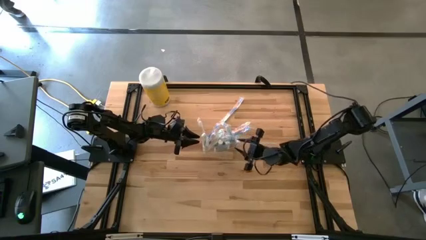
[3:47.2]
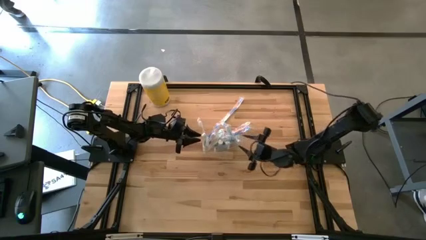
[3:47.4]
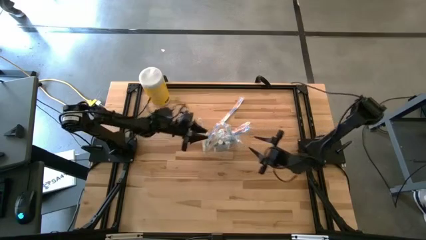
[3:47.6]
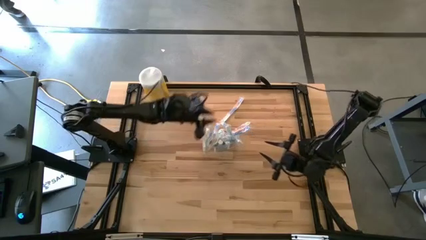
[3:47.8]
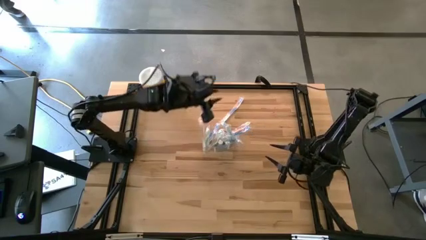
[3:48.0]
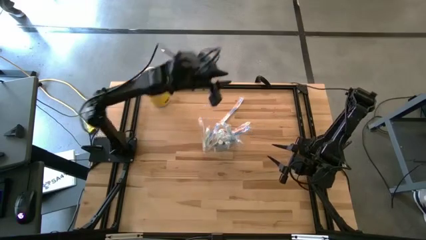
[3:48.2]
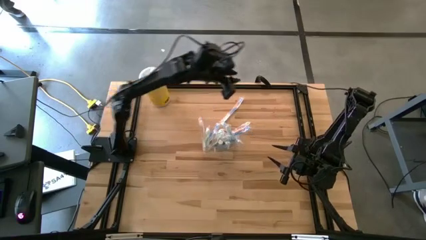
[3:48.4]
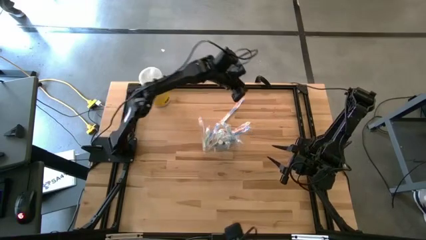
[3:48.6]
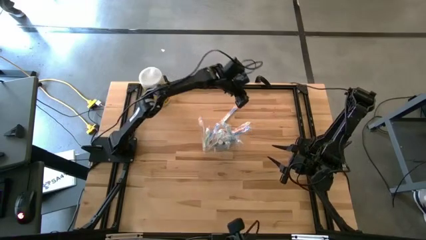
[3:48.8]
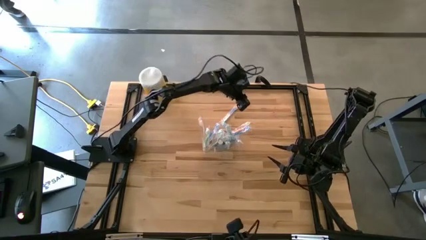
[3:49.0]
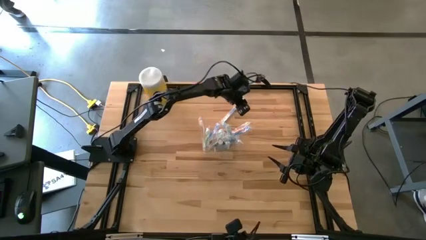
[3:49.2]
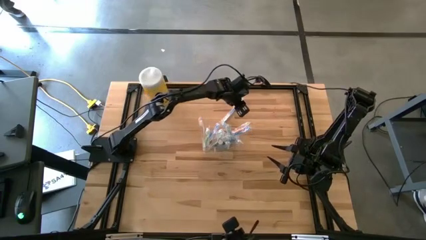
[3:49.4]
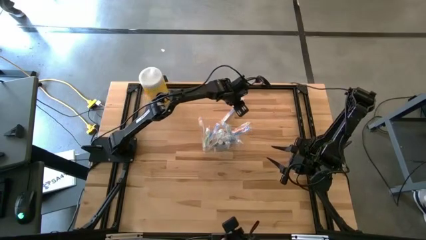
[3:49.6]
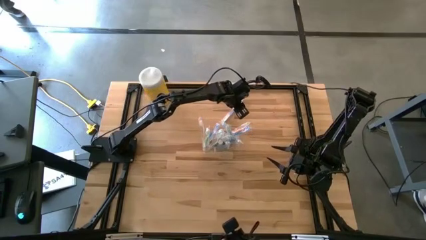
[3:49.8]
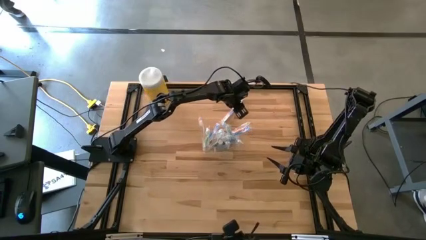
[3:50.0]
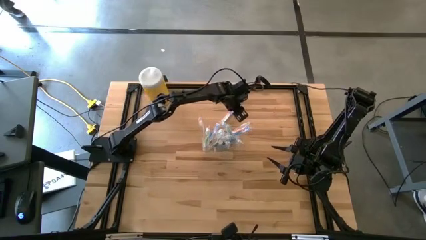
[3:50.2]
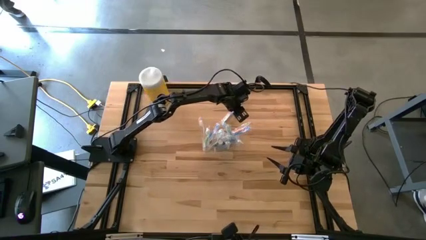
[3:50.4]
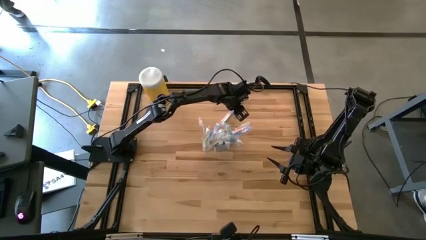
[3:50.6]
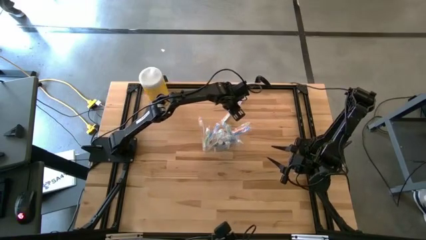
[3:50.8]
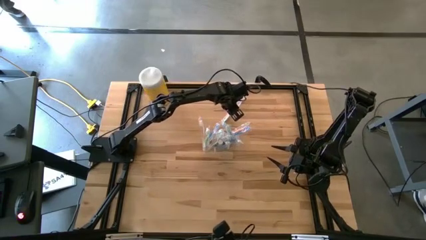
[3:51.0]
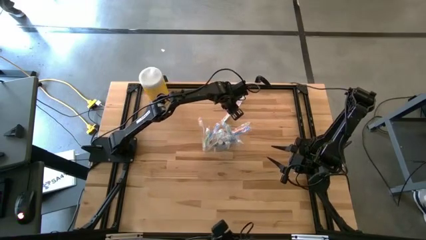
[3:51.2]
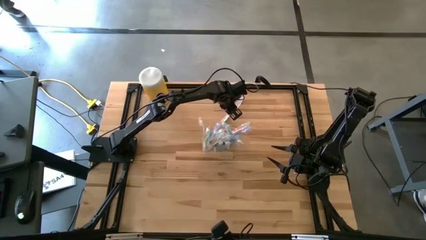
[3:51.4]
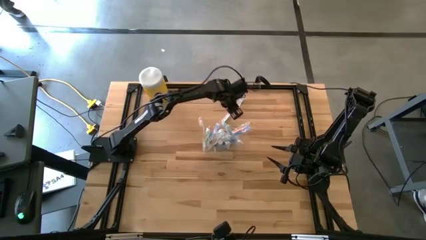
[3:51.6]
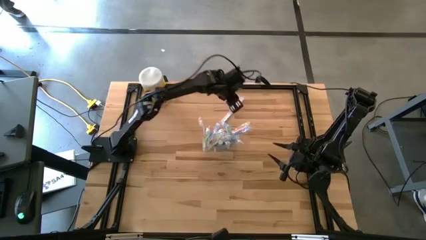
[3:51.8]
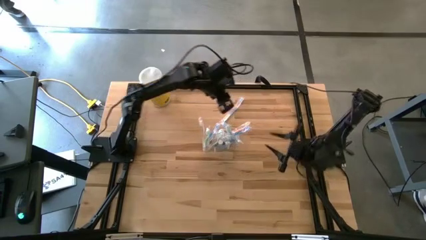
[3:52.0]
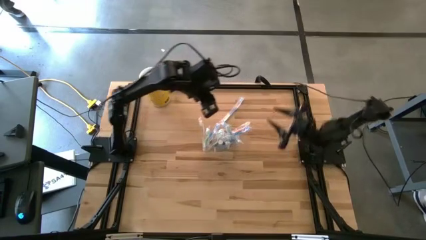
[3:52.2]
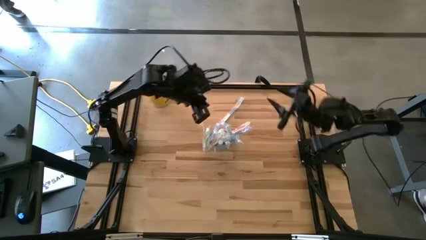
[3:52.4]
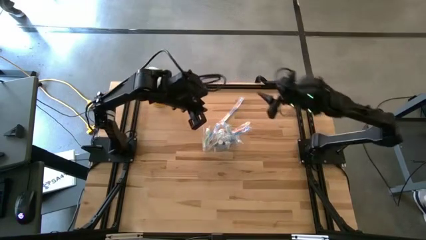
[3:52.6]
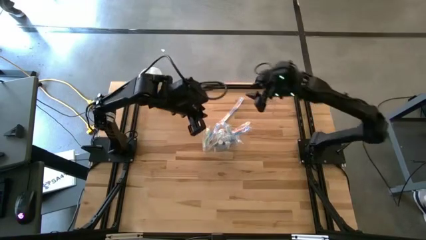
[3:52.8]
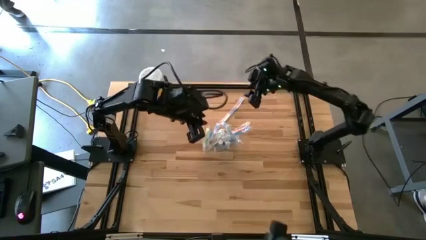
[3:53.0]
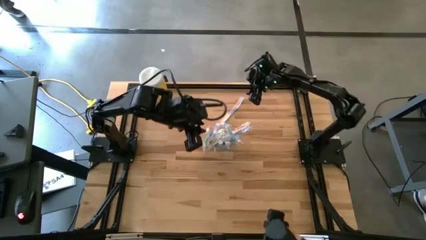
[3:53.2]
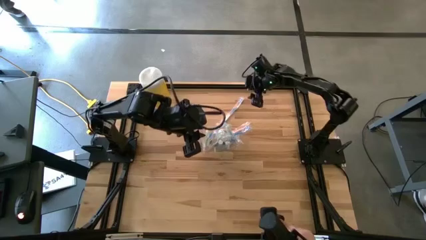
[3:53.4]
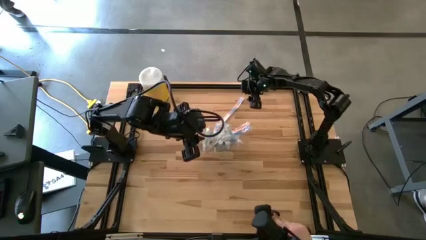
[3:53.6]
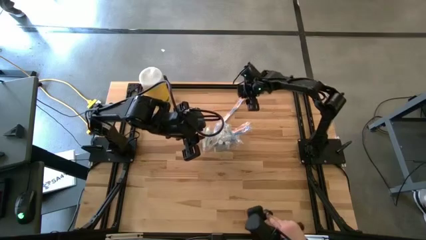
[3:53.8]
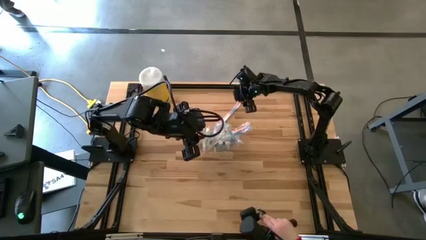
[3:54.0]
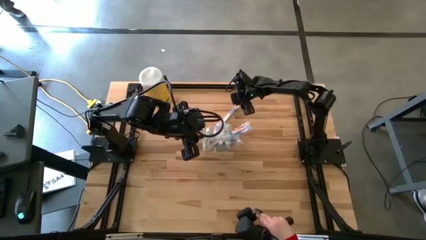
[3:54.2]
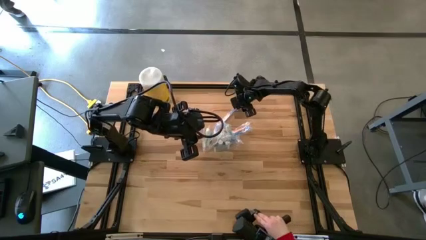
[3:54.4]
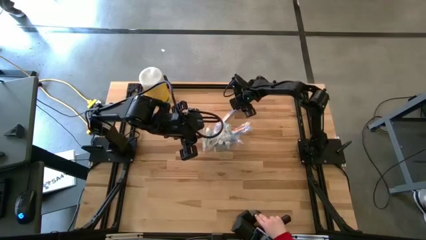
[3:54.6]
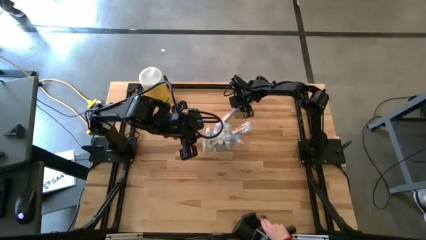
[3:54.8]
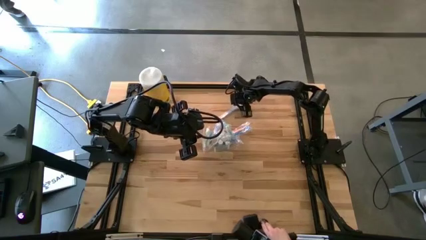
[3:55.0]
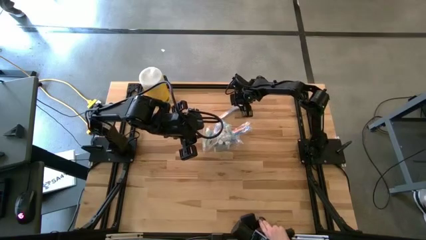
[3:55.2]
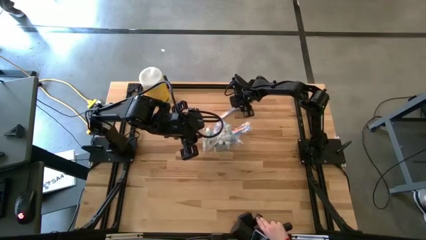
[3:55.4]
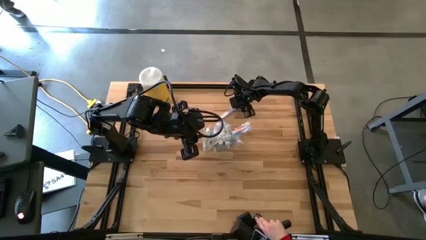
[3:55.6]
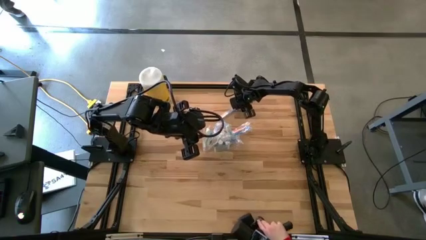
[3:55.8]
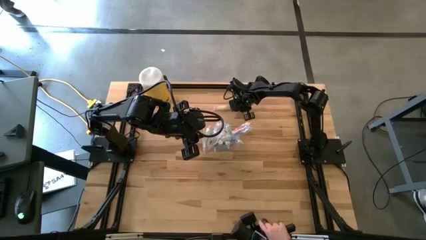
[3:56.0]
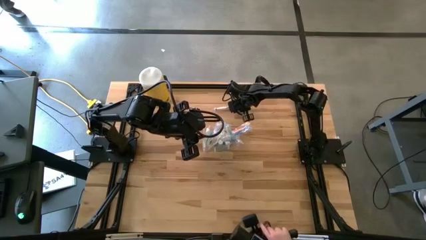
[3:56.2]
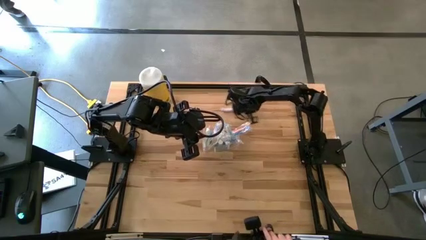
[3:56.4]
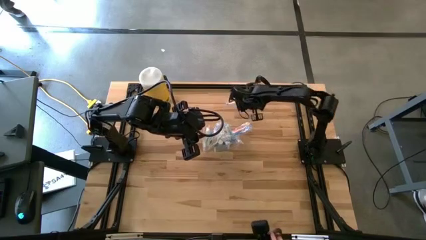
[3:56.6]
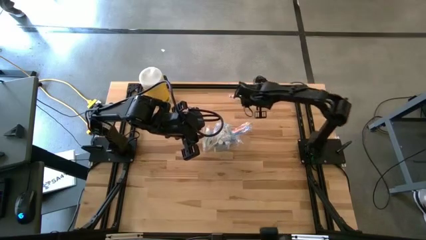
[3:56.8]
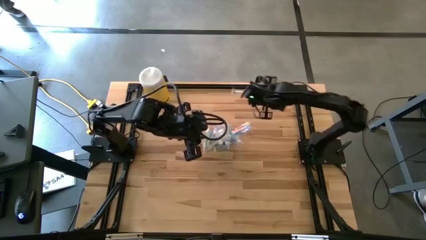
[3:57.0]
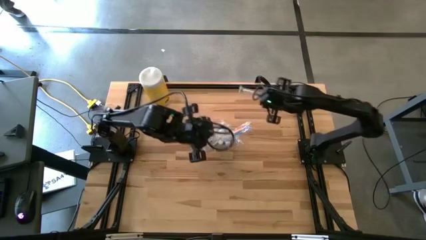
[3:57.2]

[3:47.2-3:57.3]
Task: Pick & Place toothbrushing station
Put the blue toothbrush into the transparent organizer

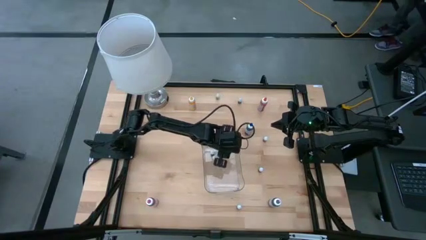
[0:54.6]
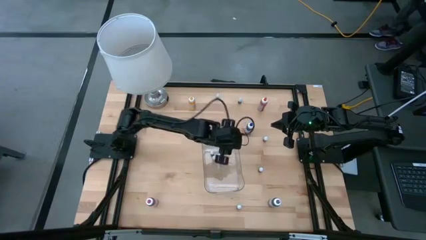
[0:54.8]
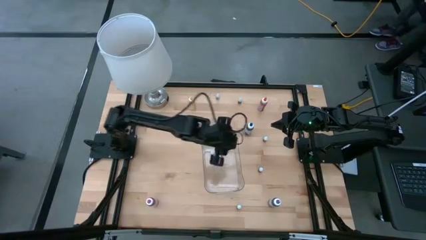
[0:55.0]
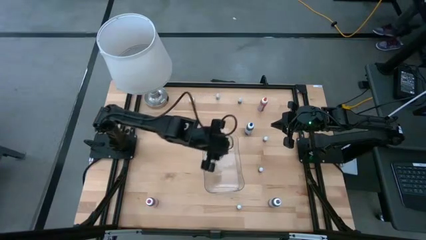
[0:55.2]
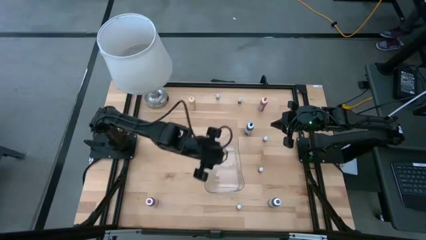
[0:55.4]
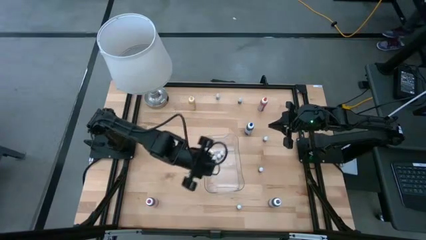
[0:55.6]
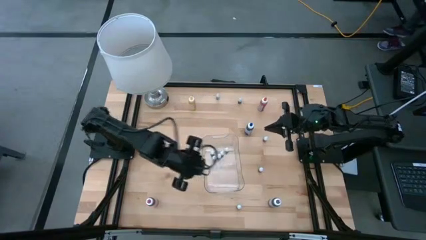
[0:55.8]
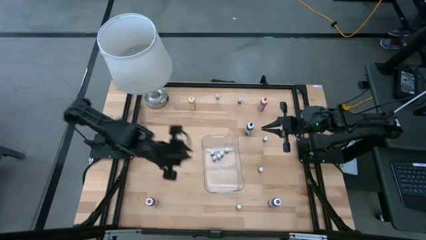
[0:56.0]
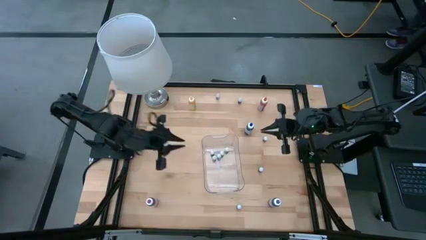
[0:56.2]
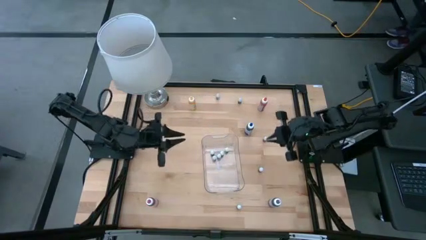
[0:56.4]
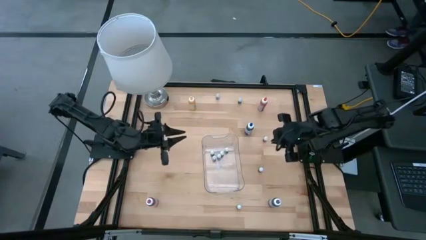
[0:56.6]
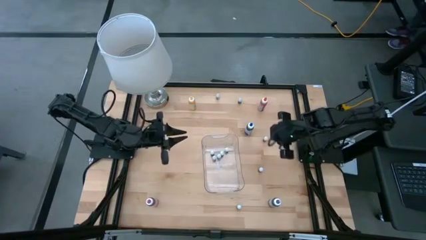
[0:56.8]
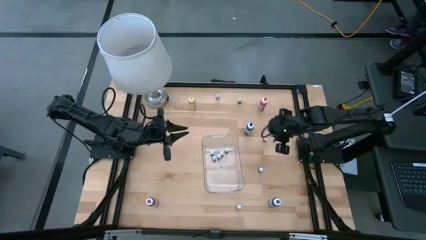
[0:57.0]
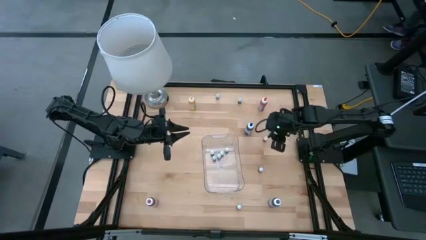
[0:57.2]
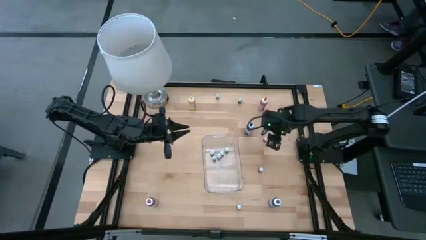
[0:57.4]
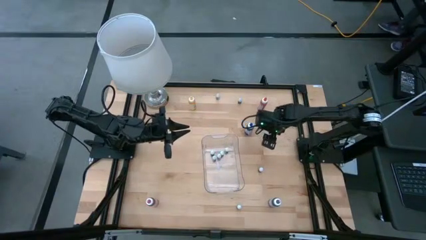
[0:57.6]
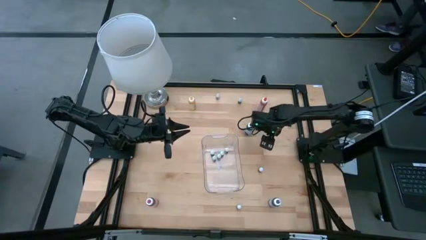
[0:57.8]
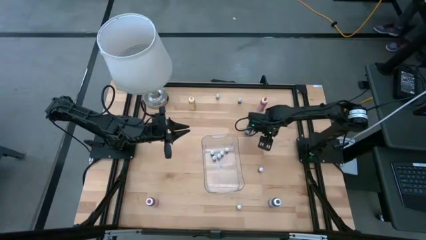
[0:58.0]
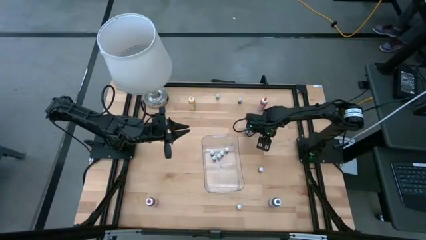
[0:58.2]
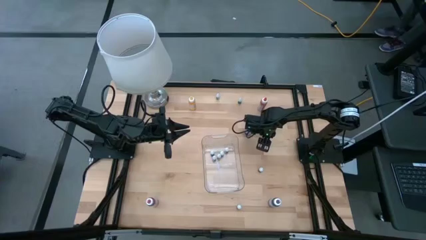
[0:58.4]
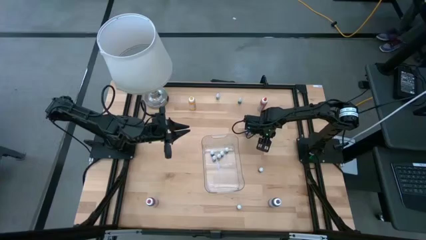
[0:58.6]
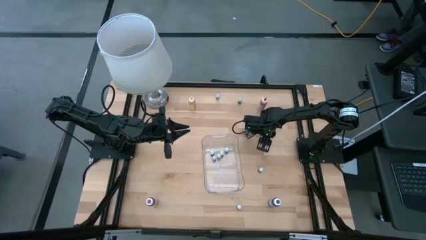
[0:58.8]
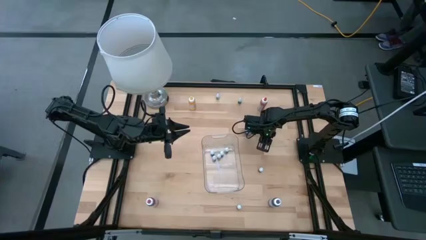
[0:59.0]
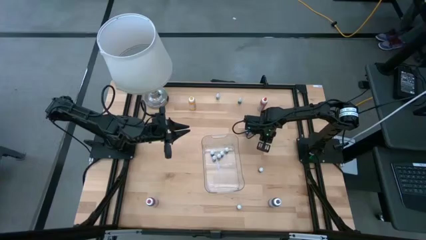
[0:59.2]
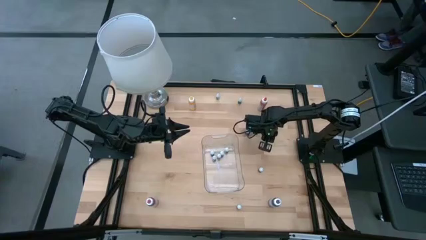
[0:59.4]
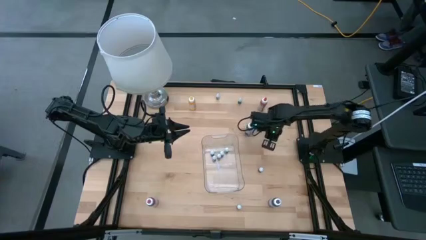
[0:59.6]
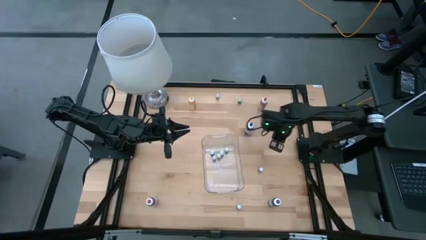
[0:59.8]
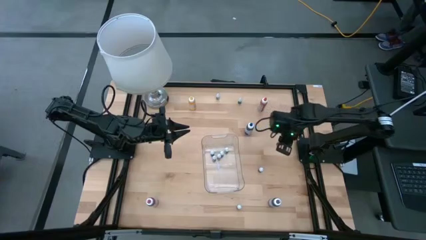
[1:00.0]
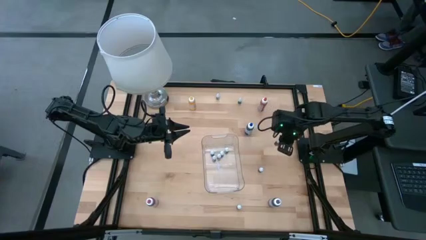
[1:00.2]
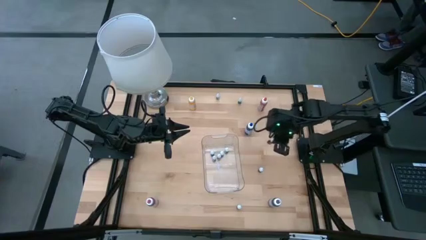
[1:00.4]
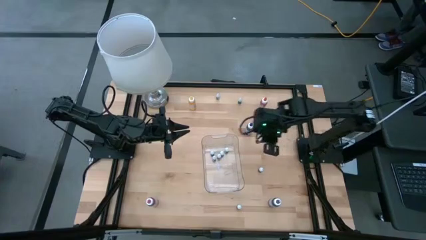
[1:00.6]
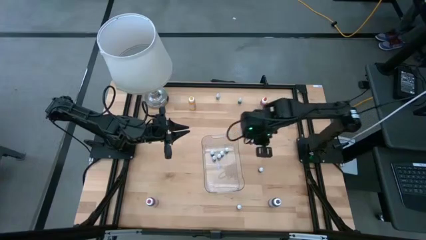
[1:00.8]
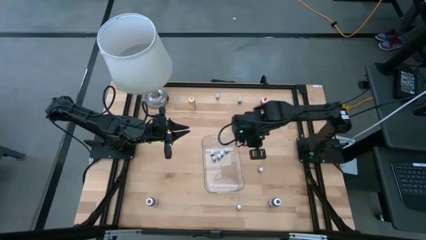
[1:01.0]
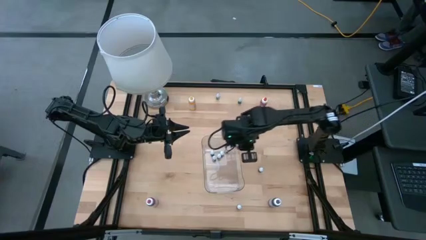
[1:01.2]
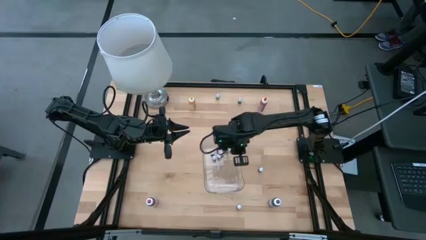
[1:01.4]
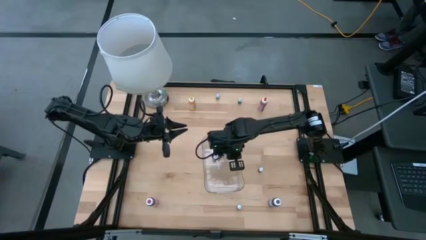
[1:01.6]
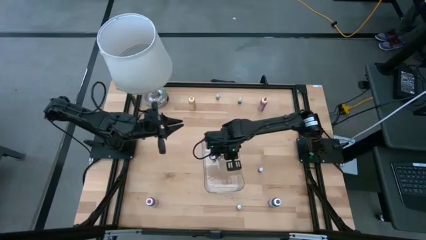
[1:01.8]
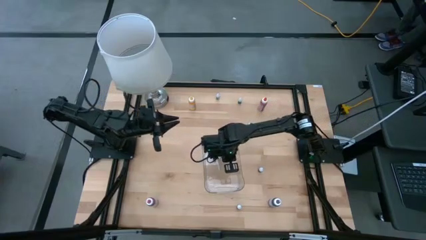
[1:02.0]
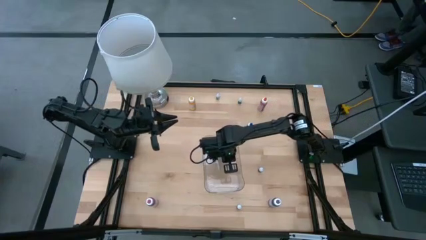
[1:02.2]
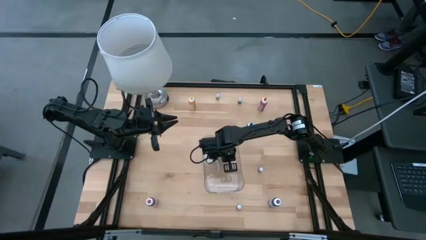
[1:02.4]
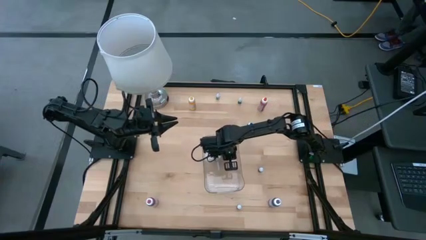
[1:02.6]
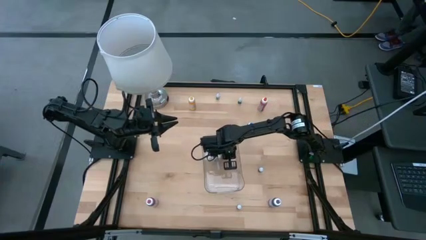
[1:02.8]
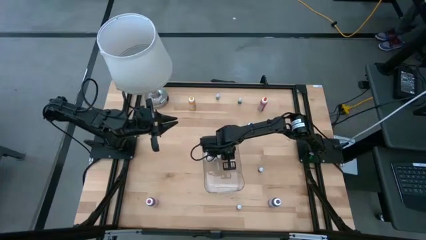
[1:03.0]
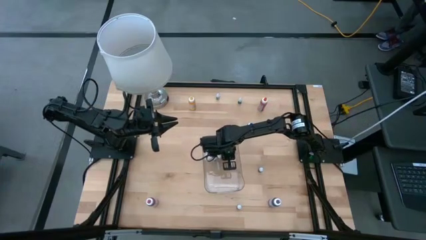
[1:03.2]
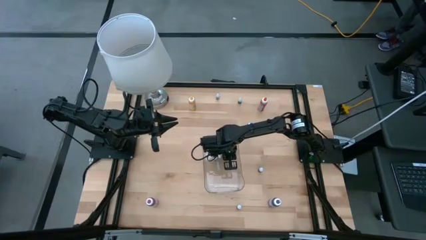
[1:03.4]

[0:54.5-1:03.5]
Task: Pick & Place food coloring
Put the small red food coloring bottle into the transparent container
